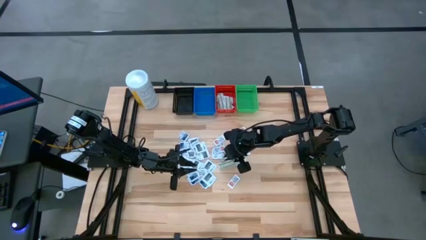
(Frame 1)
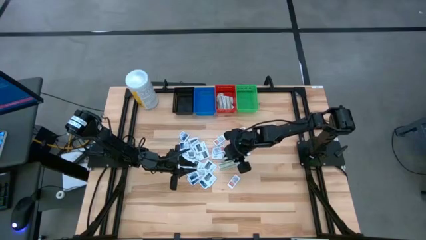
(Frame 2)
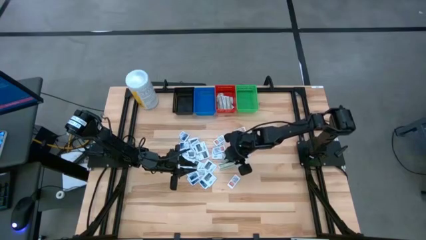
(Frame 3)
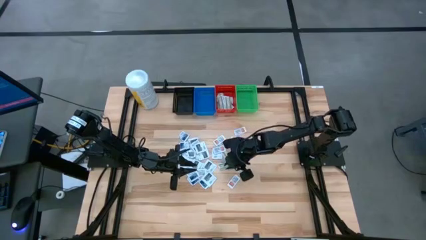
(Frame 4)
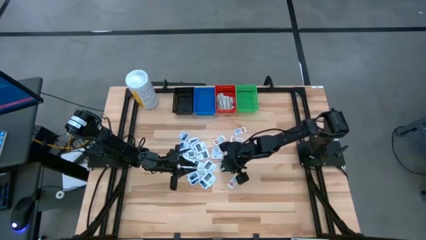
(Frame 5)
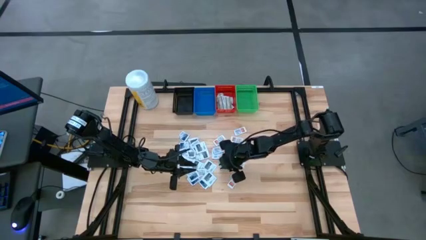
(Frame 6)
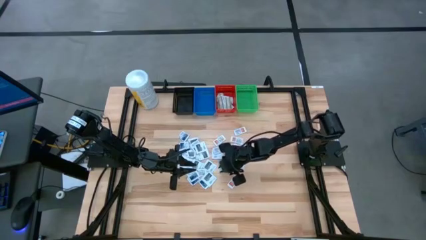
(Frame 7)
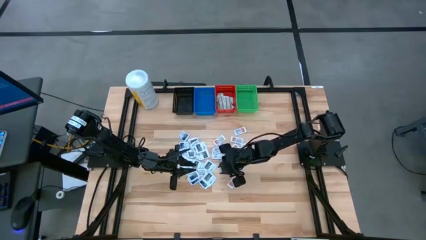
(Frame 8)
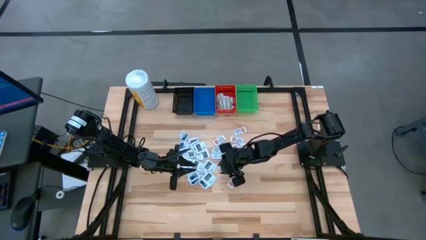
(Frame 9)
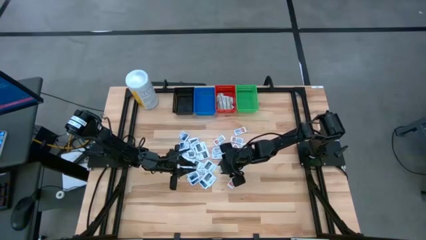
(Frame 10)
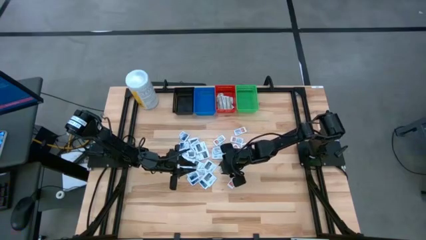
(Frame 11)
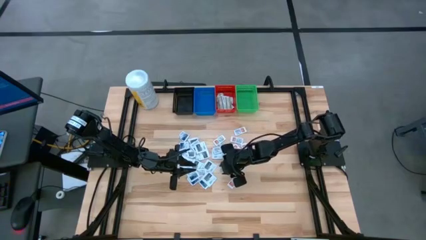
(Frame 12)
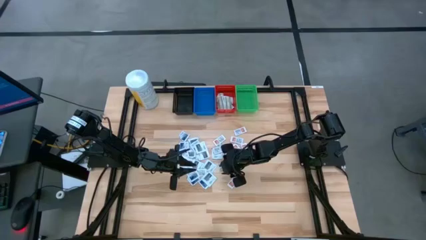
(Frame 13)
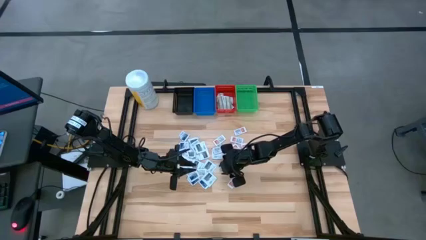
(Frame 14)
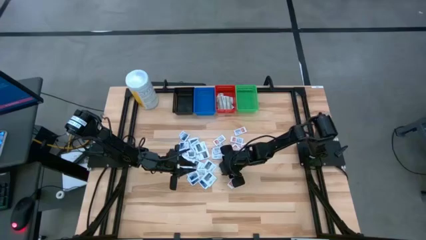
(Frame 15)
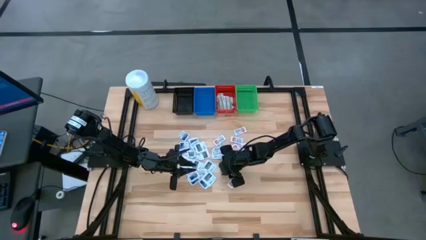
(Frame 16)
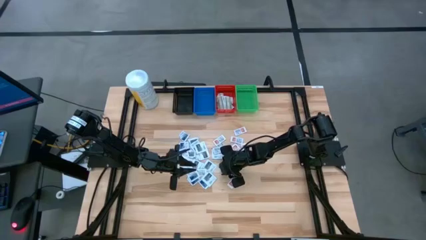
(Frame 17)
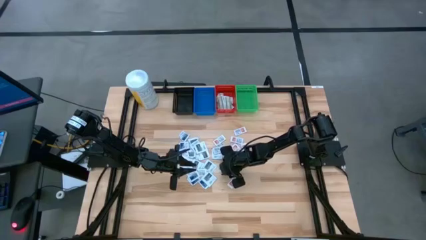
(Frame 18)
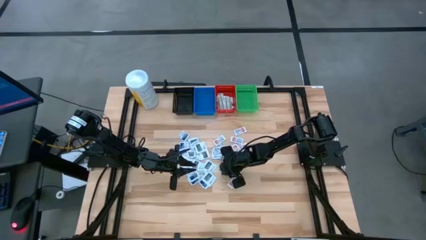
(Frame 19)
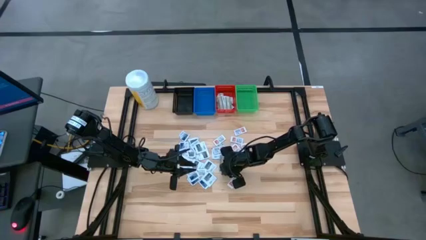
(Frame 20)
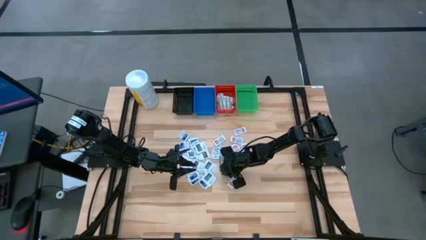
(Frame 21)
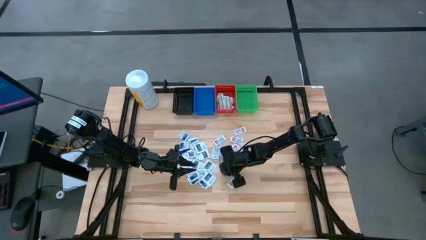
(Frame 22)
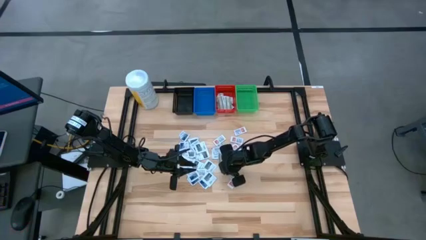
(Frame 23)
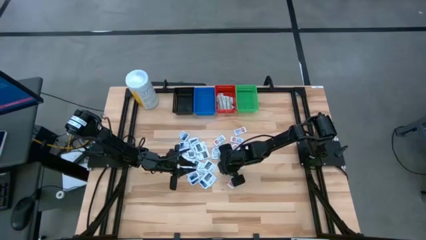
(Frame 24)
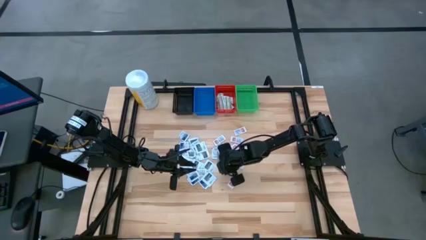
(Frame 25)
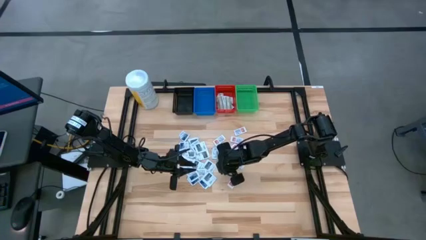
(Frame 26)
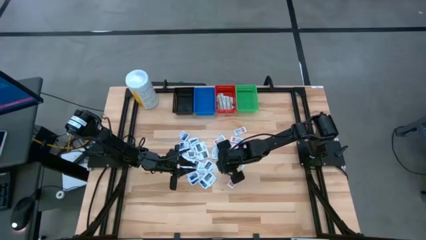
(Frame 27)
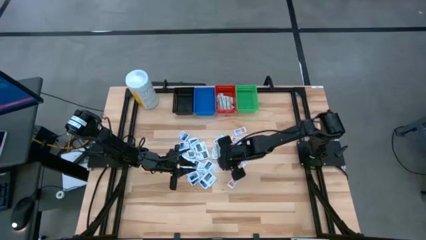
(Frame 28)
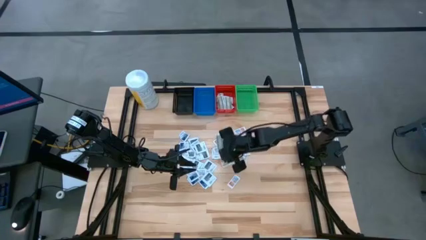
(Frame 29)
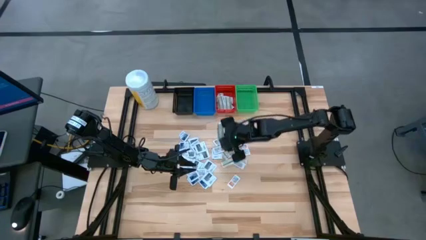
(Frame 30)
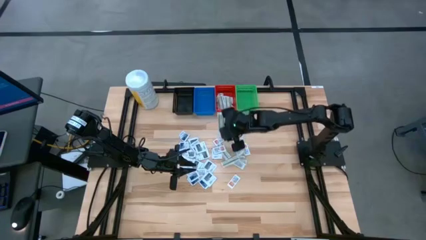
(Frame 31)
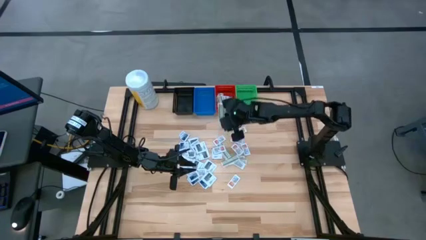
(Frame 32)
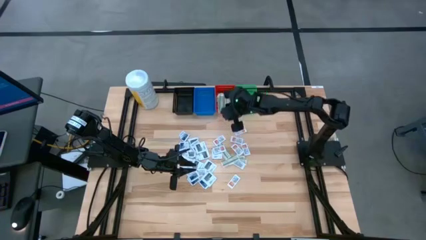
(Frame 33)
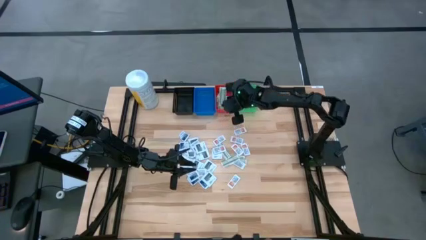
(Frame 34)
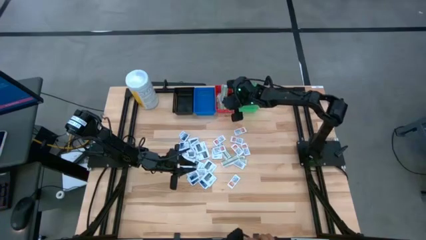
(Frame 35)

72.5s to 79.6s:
Task: Pick & Place First Aid Supplies
Put the green bandage pack into the red bin

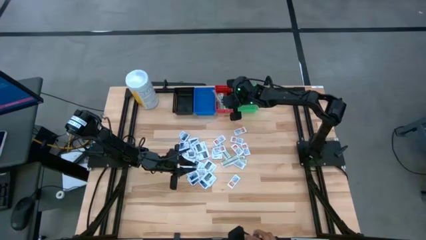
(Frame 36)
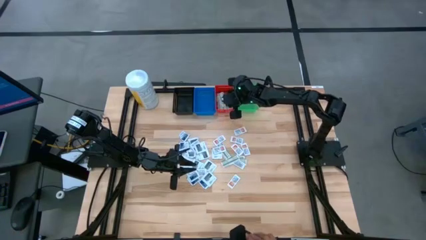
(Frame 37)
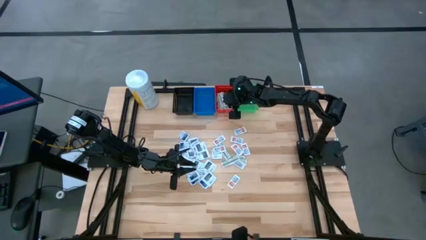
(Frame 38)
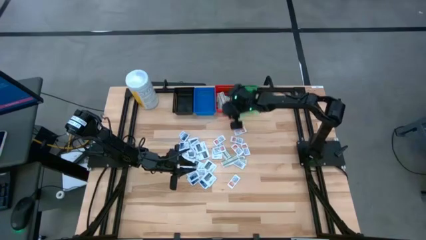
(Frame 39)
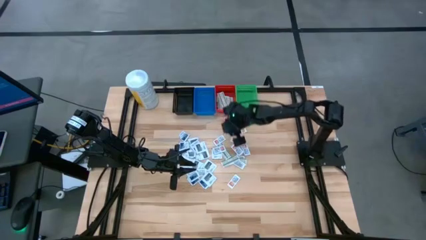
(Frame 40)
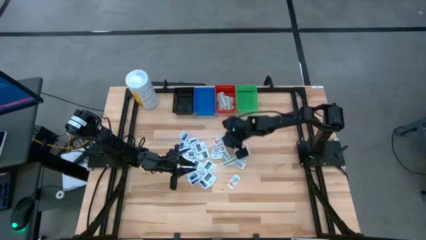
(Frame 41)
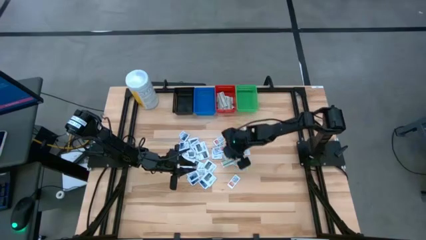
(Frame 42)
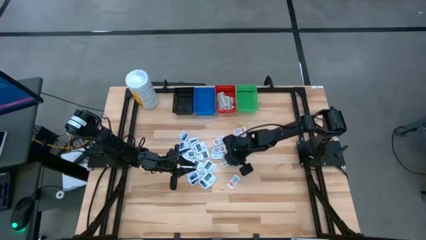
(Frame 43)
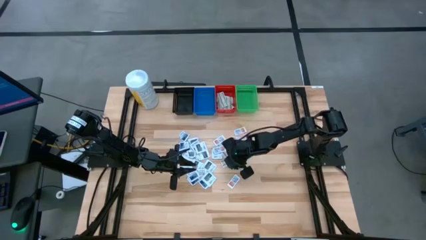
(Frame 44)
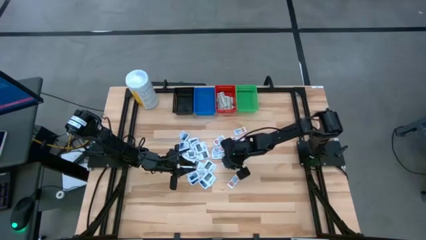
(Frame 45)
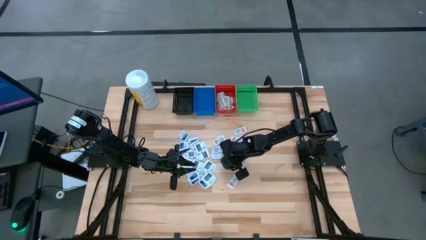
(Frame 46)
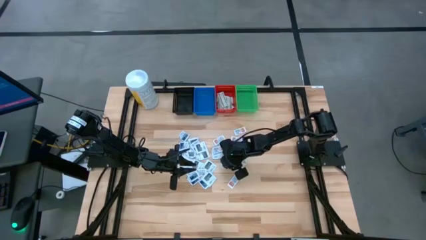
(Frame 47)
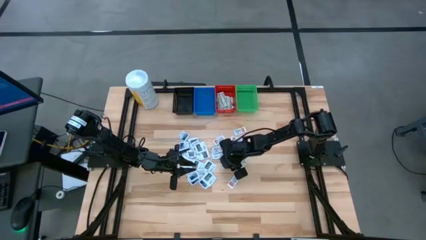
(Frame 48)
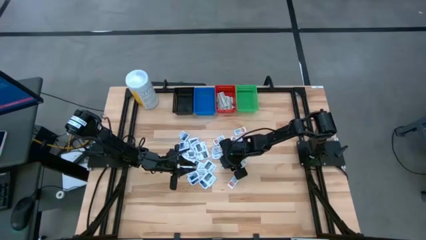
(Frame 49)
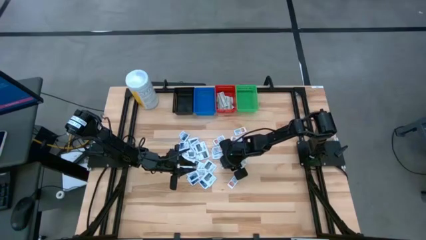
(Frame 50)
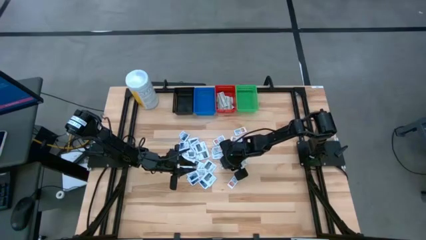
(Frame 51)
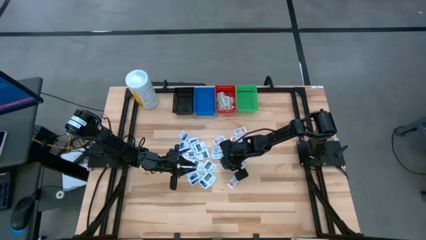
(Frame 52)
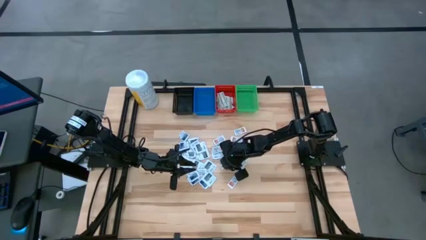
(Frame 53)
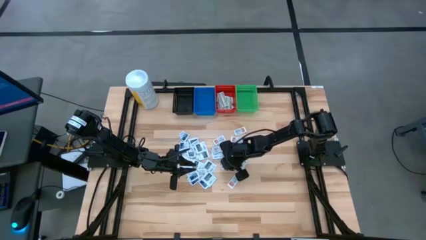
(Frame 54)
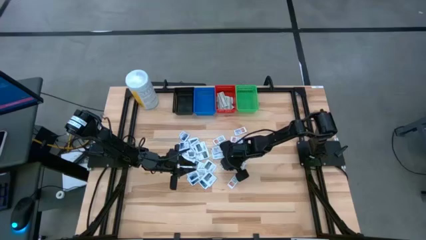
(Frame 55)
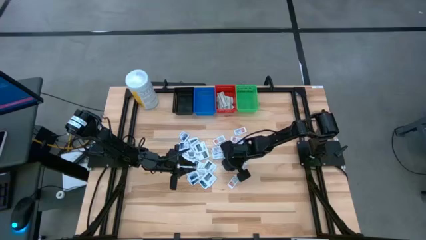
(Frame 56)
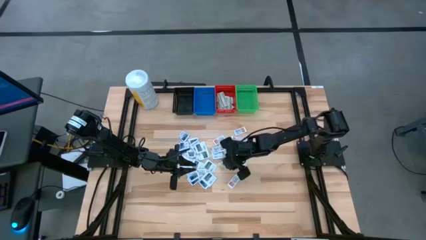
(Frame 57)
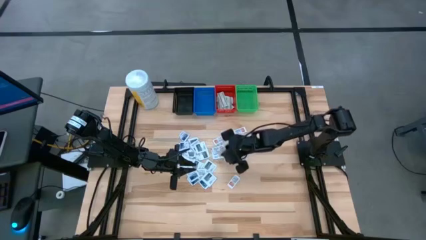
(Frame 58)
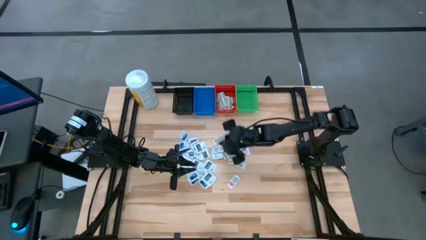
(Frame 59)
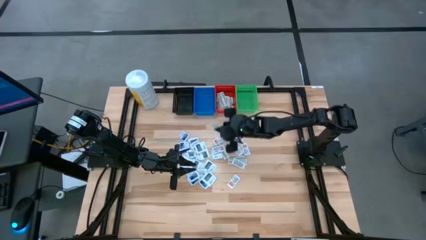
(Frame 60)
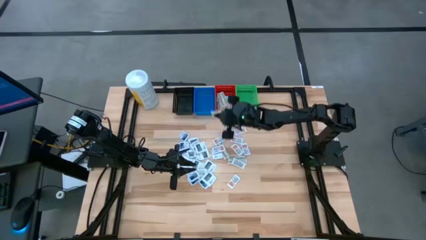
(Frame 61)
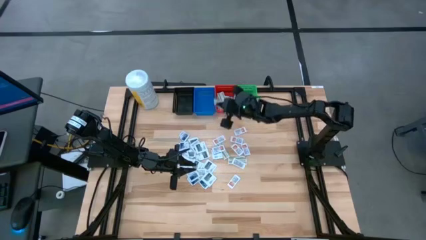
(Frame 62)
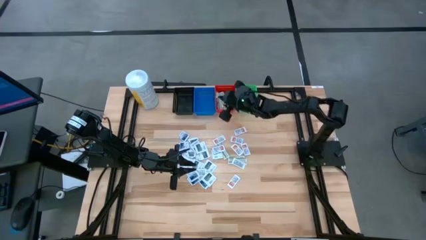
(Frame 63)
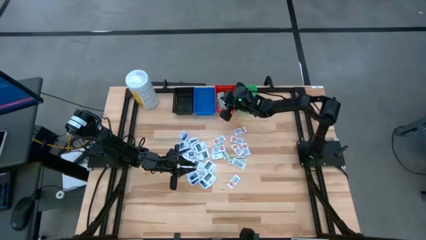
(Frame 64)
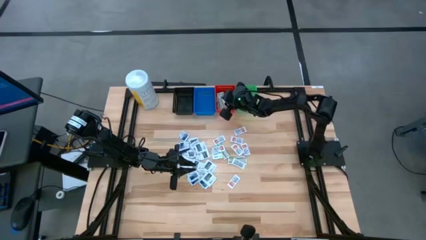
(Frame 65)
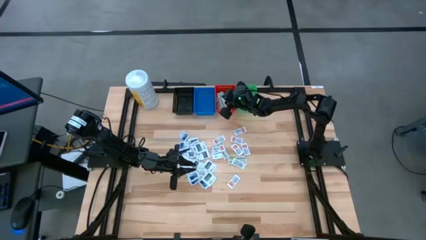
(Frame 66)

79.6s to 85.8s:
Put the green bandage pack into the red bin
